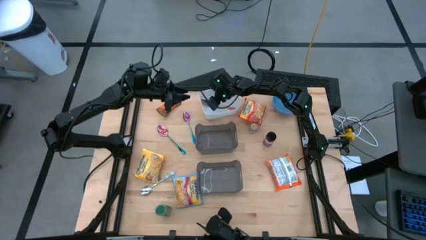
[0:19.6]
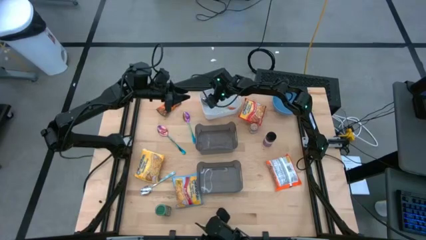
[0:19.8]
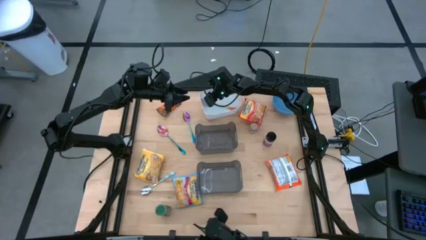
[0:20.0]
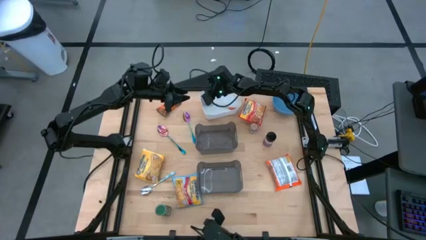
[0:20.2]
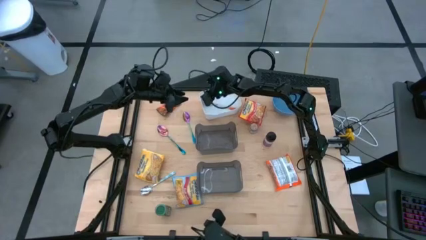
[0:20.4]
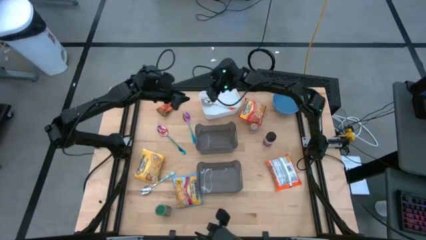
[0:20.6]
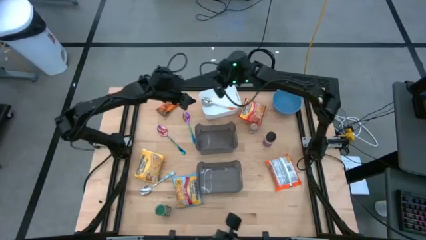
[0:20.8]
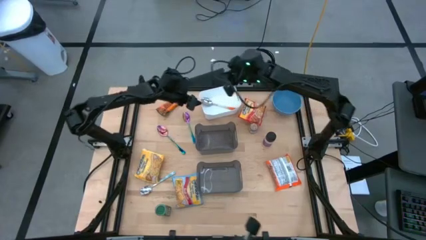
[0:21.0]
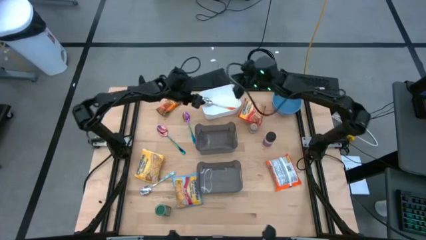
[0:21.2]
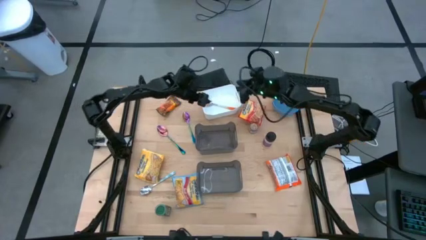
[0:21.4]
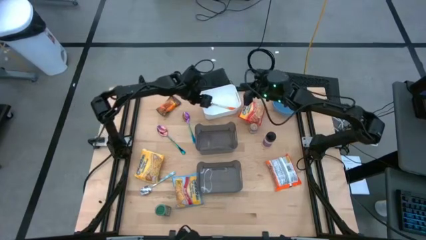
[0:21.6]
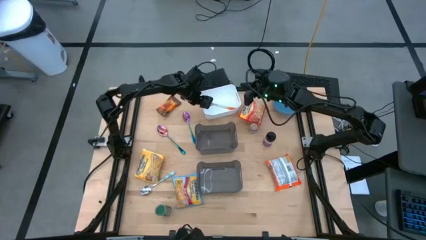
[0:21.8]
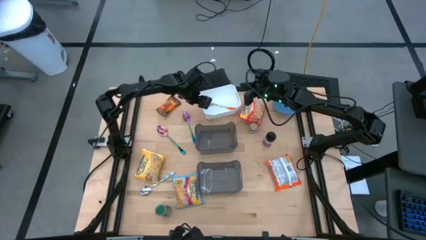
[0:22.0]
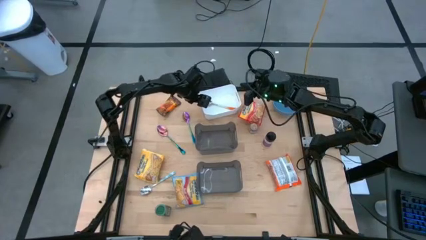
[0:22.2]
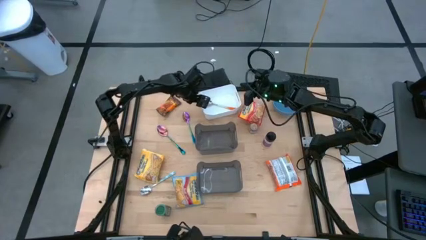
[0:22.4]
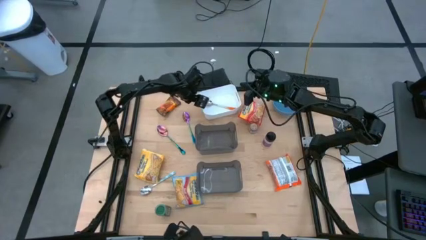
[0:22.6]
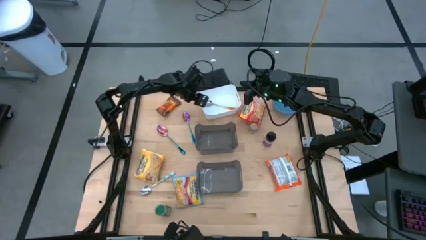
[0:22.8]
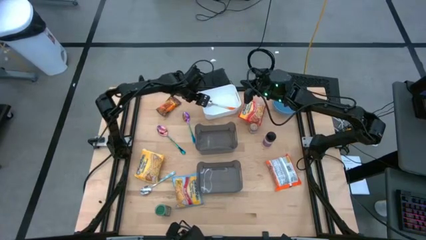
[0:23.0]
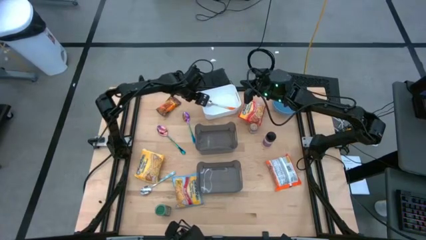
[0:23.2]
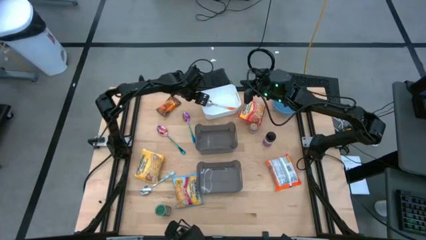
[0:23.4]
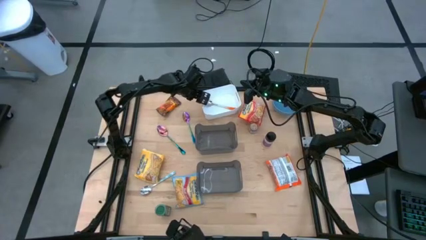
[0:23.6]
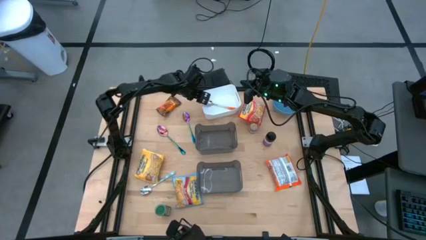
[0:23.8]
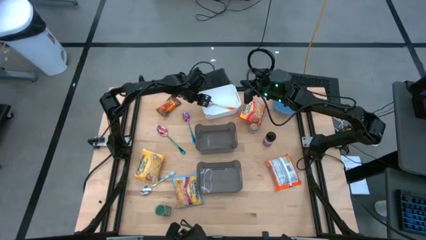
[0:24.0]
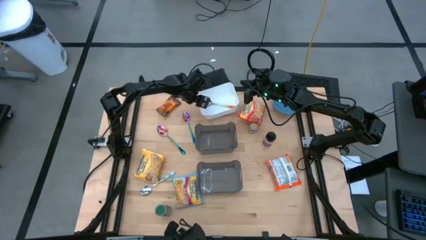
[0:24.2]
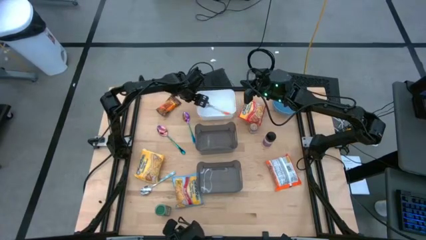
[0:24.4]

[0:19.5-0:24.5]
Task: Pick & Place Food Item
Adjust the white bin

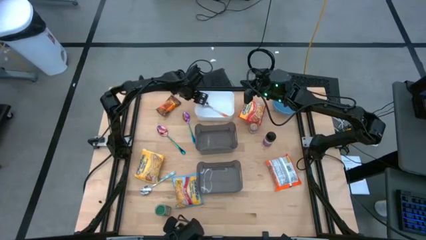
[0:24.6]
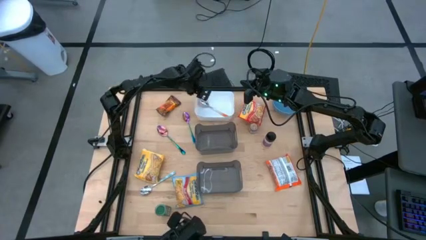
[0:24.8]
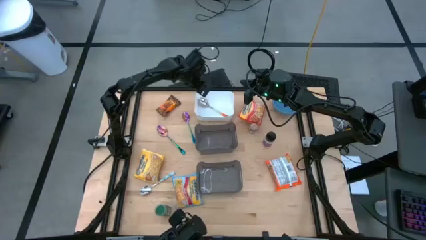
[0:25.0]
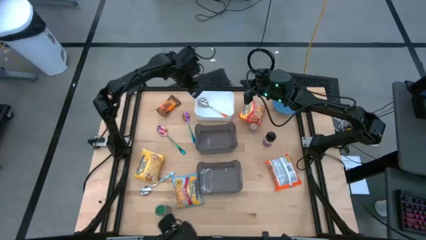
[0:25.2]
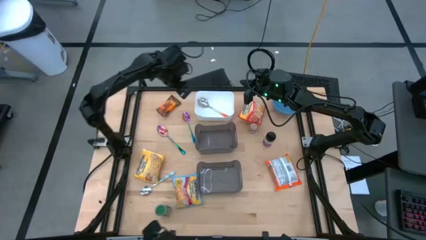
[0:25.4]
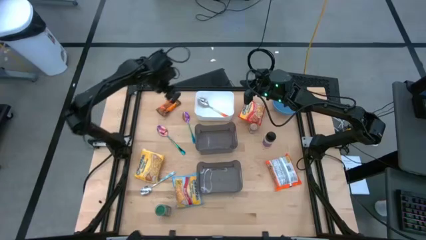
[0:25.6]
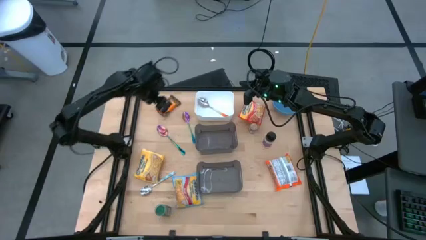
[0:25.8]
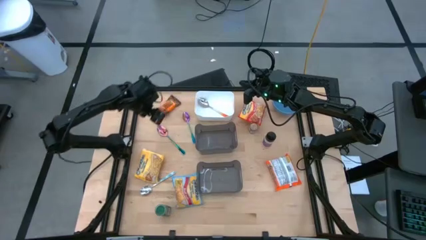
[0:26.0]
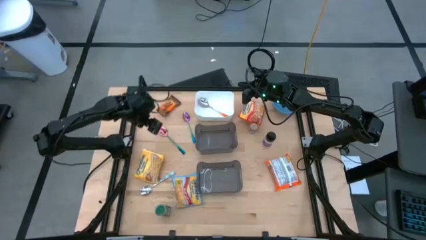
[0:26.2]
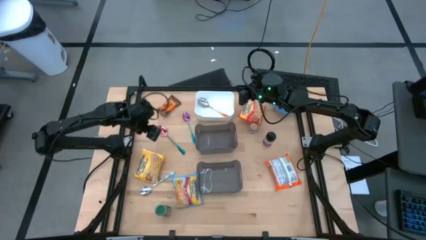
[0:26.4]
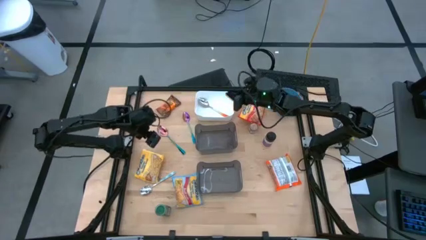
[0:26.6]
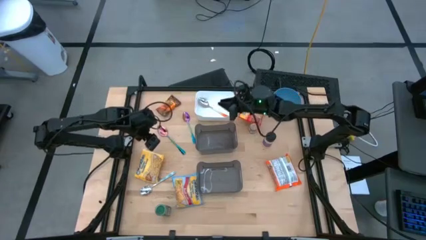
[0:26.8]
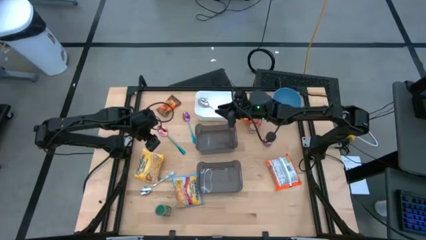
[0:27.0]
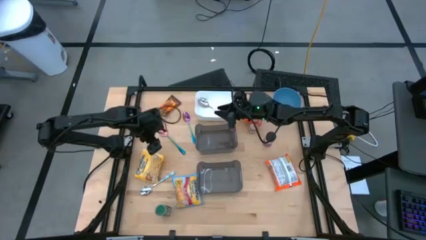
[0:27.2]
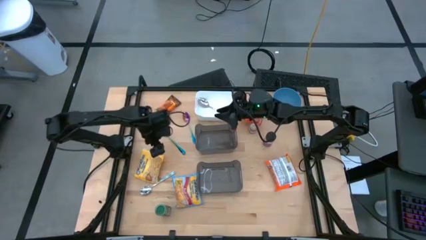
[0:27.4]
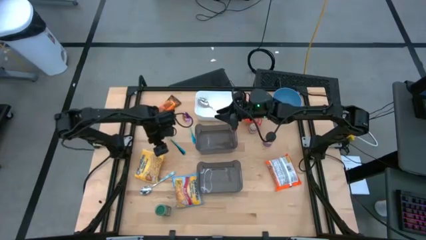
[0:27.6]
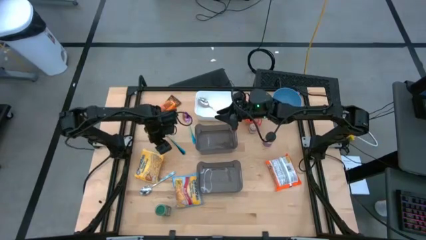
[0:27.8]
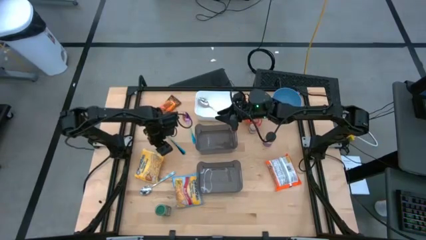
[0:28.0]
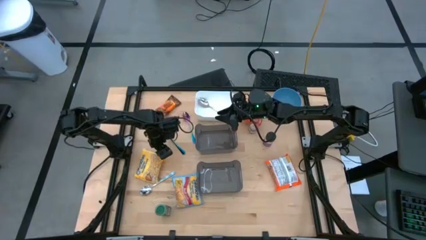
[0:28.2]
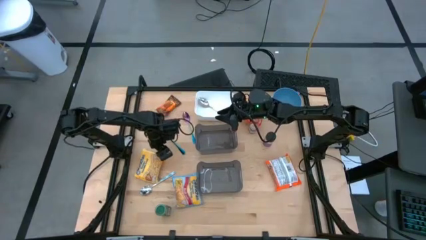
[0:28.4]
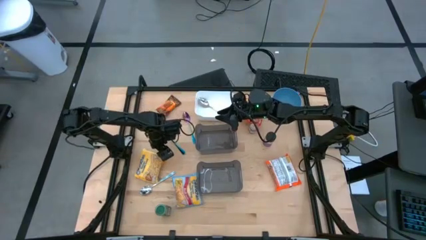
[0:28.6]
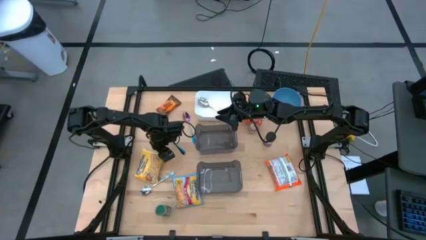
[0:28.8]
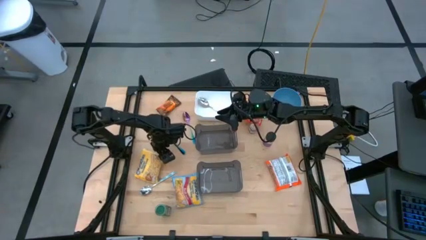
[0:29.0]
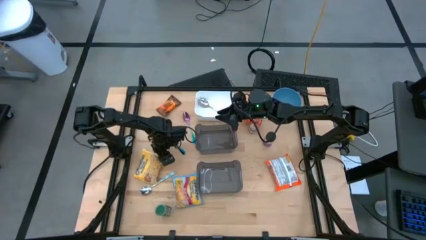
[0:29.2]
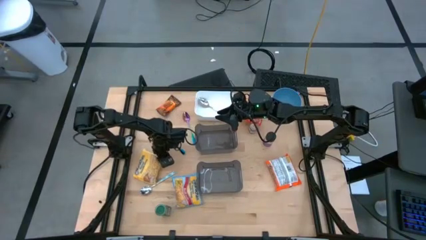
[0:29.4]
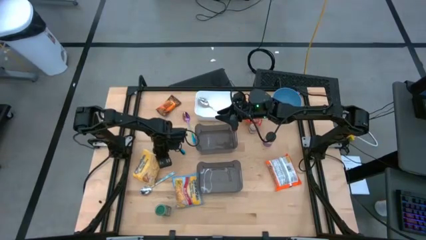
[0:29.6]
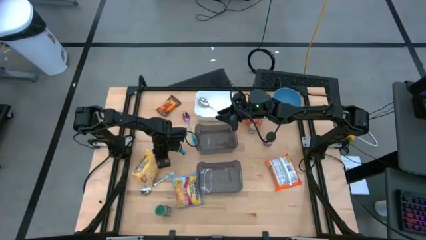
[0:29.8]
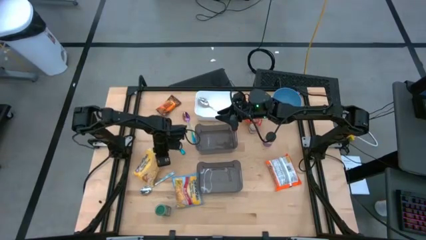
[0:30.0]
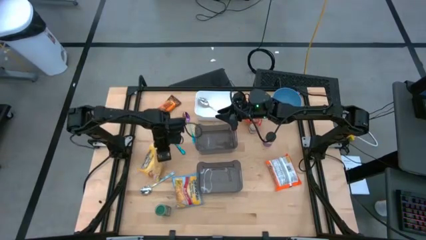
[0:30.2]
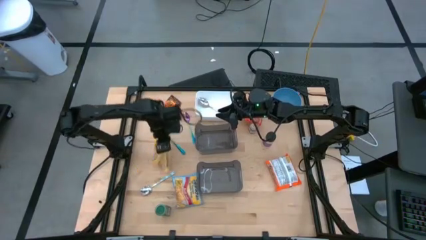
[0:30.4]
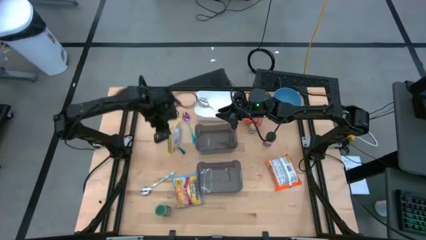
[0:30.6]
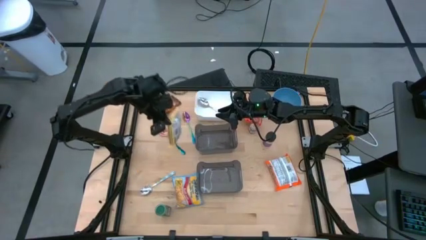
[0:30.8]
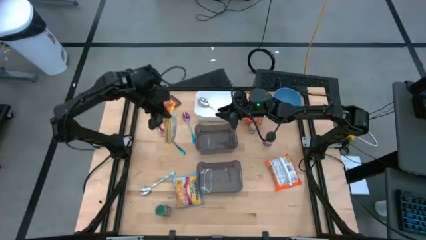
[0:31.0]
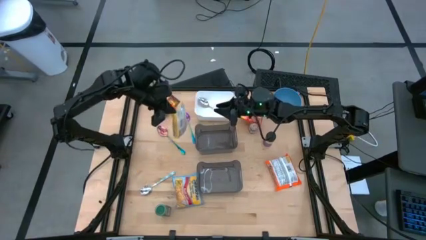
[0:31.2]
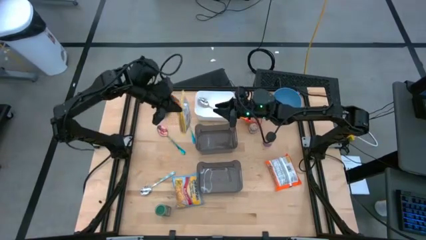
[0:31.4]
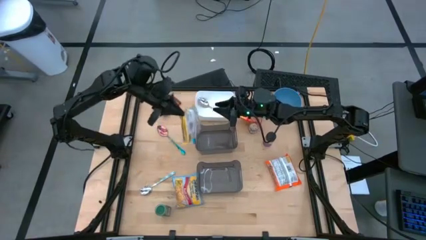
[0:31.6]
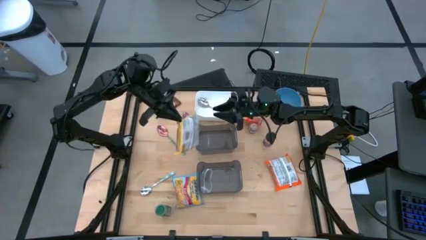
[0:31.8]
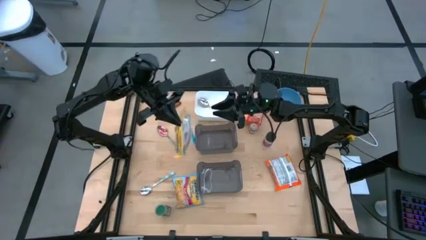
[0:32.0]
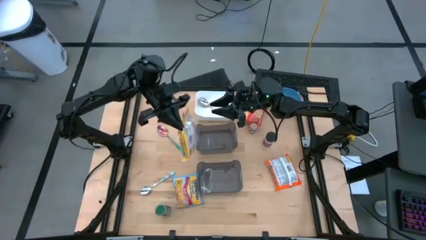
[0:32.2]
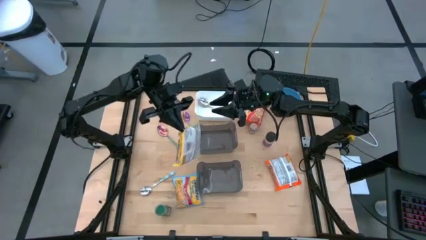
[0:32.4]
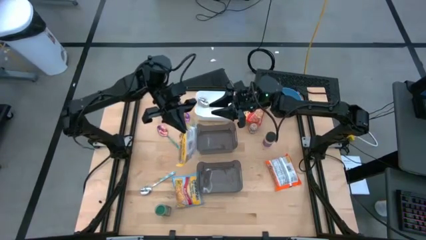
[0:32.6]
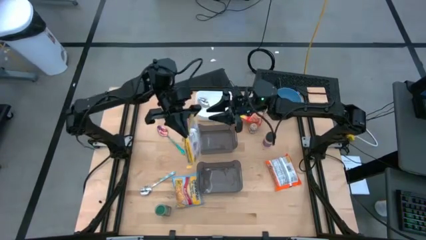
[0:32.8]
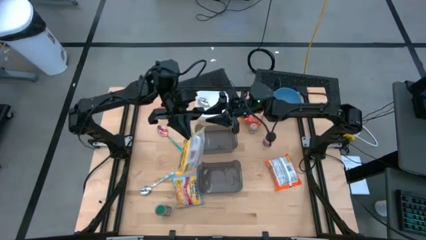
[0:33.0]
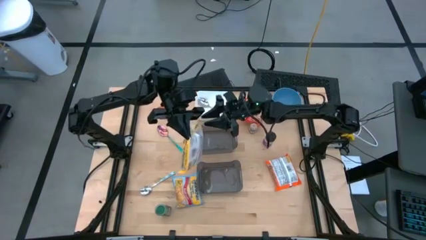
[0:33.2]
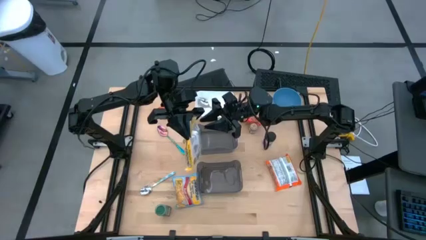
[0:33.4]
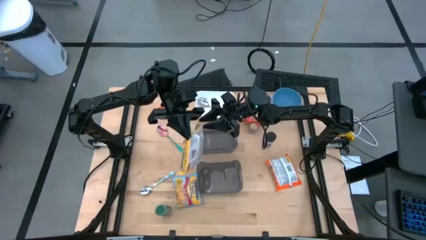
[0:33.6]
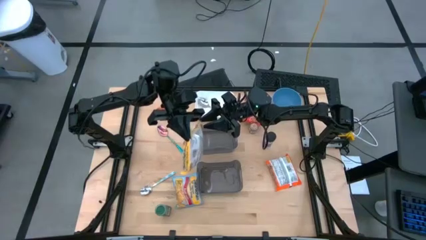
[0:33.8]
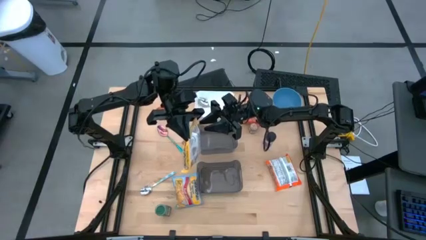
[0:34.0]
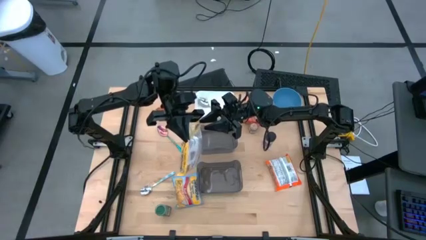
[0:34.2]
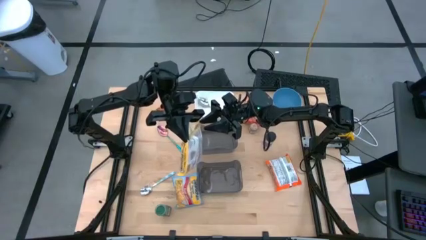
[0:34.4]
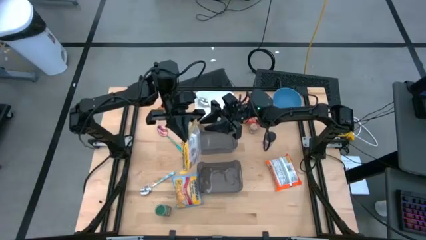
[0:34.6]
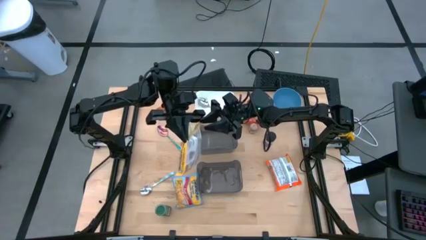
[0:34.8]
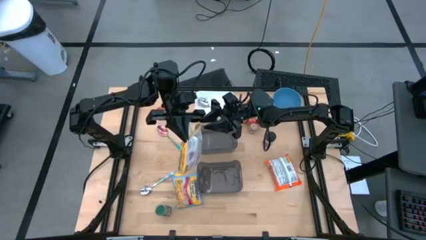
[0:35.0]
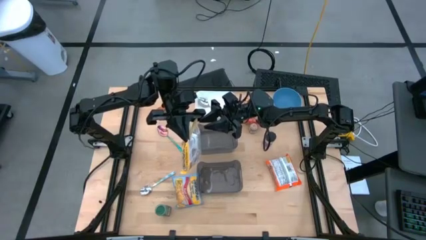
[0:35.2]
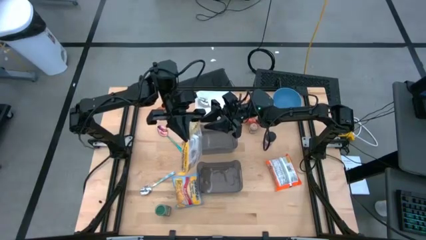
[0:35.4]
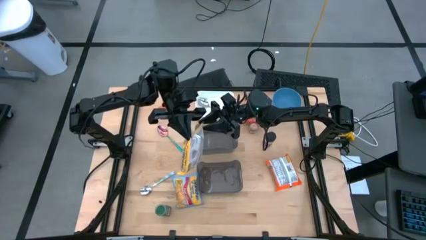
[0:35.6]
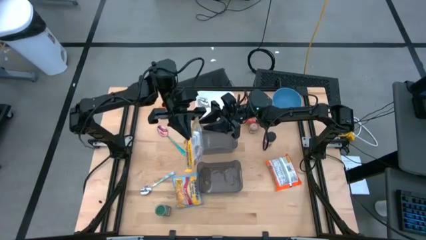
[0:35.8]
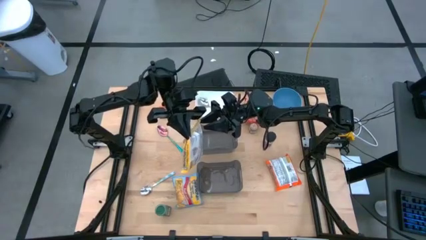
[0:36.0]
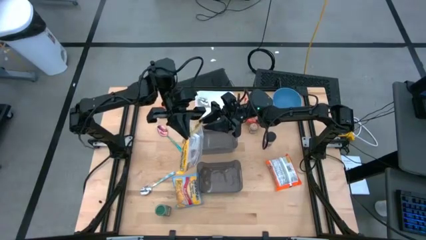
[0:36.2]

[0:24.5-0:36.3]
Put the yellow noodle pack into the top black bin
